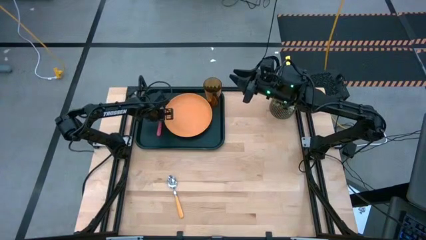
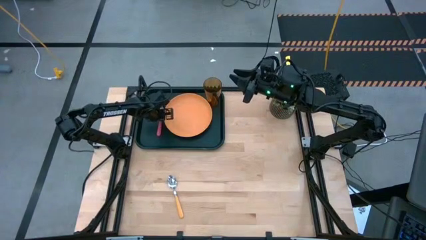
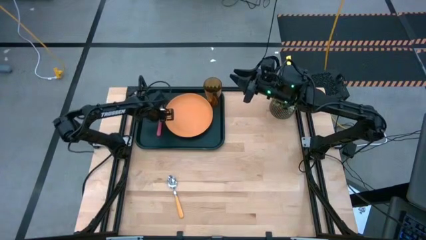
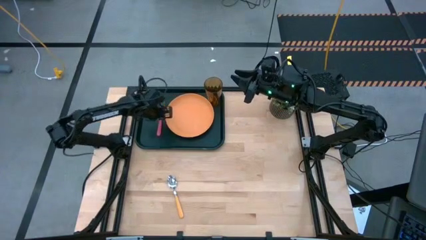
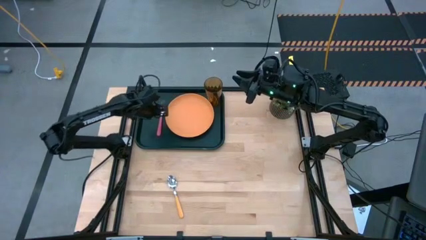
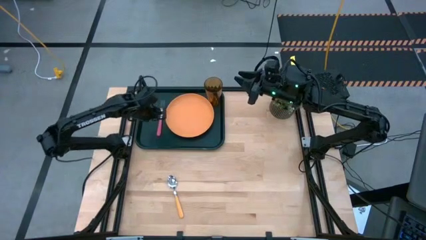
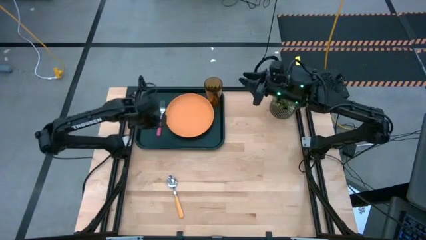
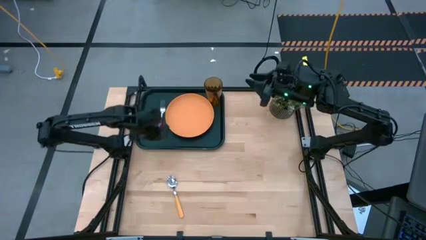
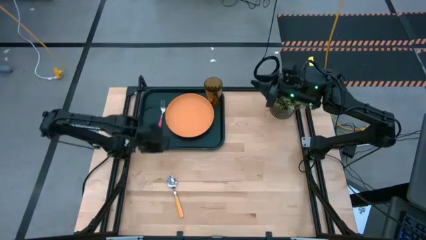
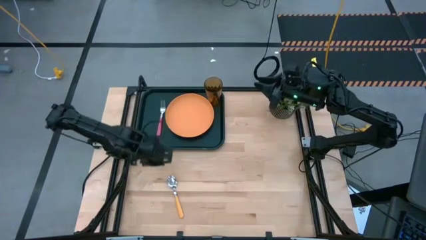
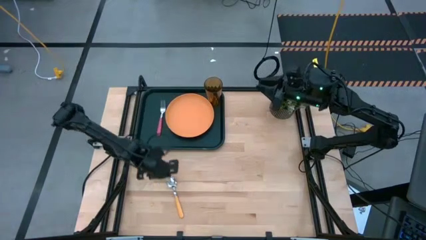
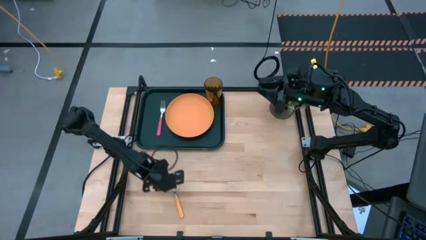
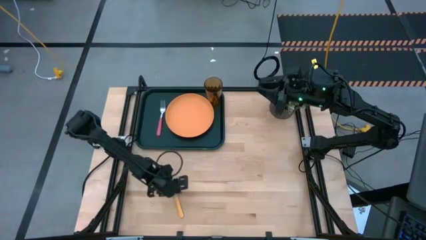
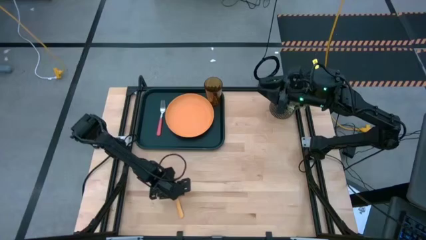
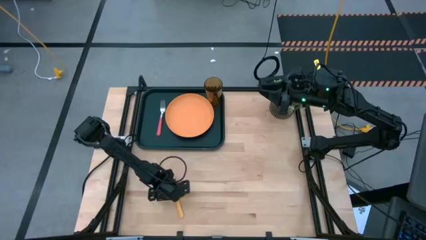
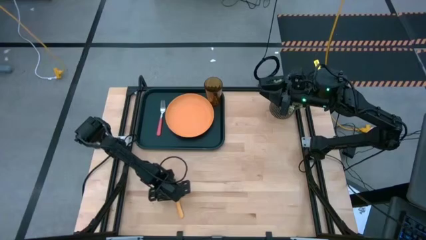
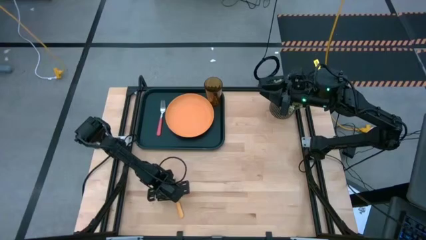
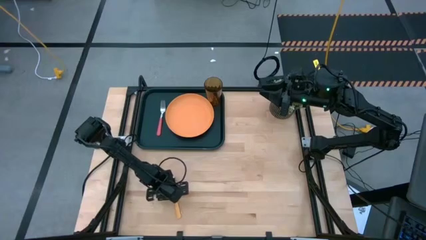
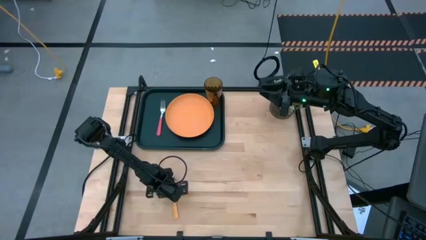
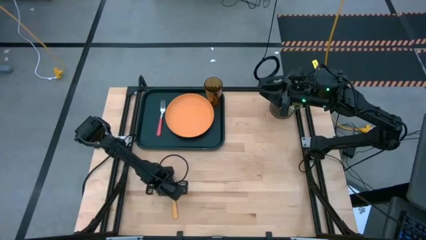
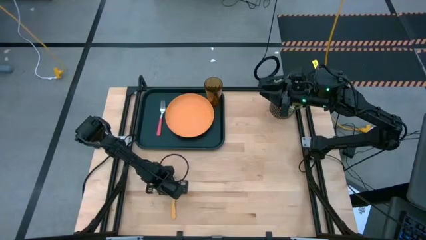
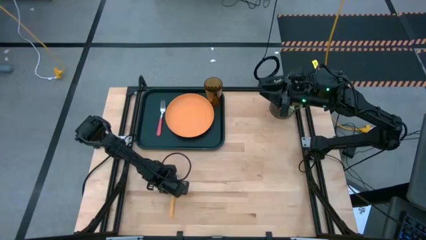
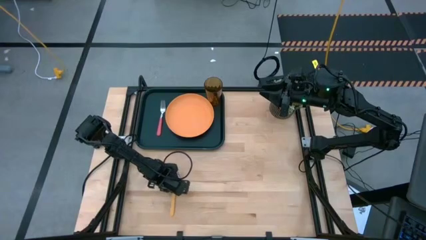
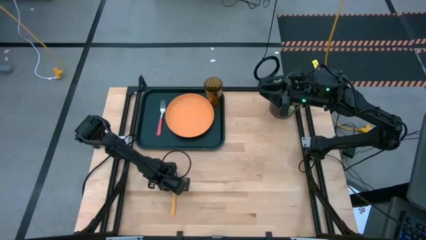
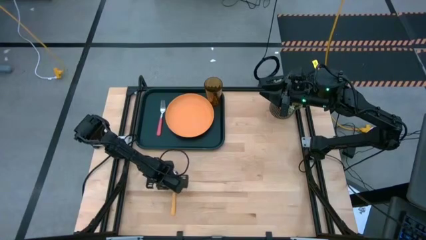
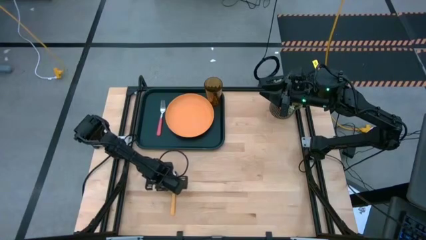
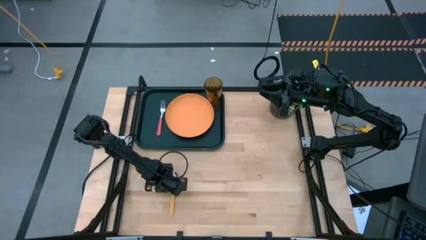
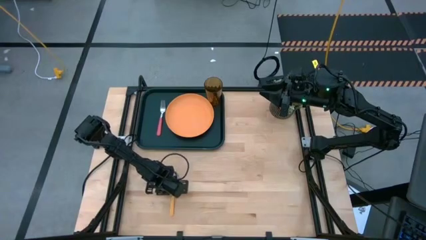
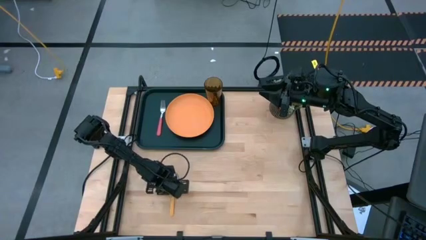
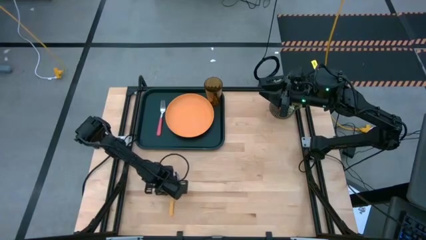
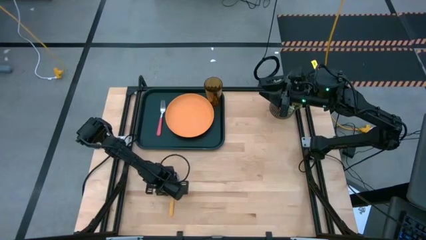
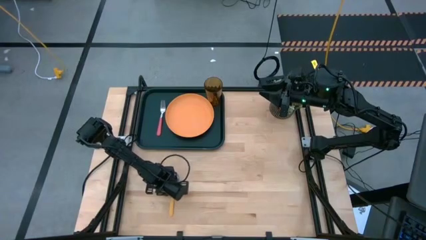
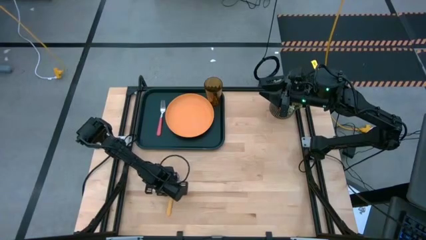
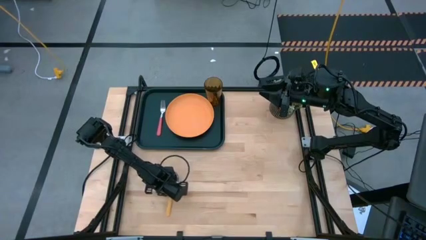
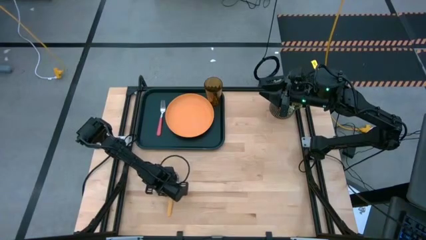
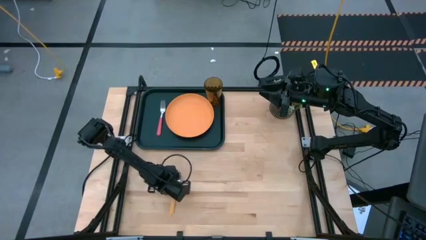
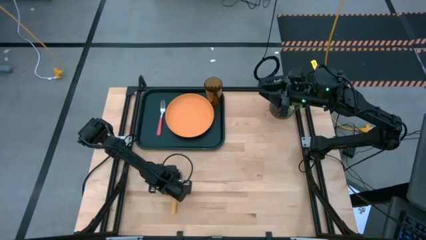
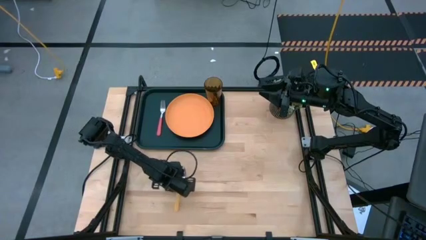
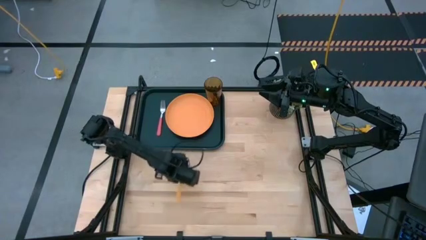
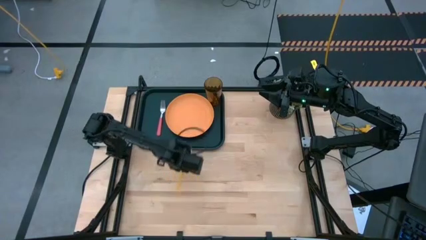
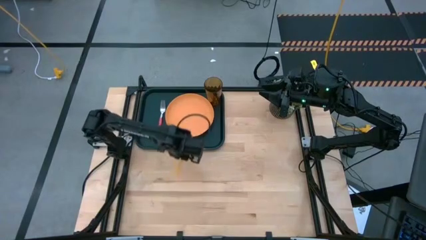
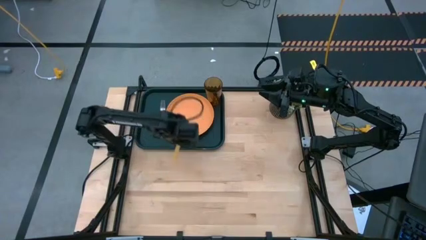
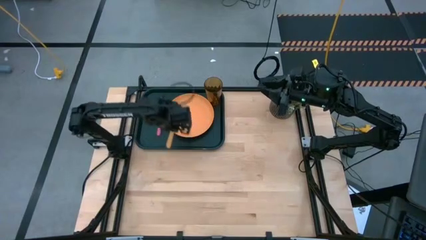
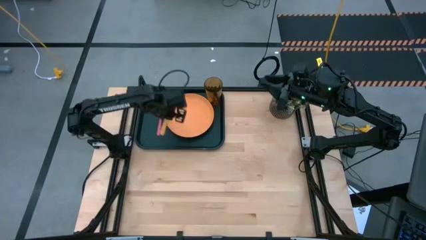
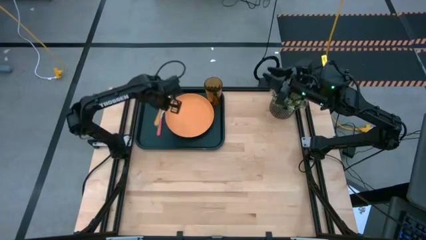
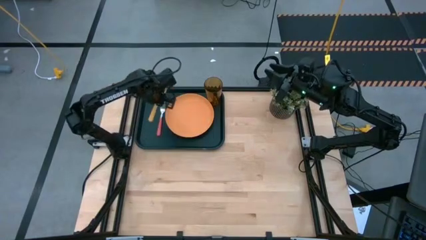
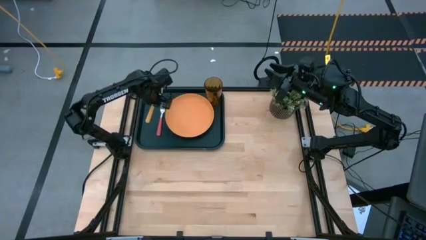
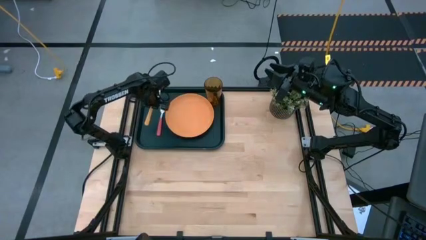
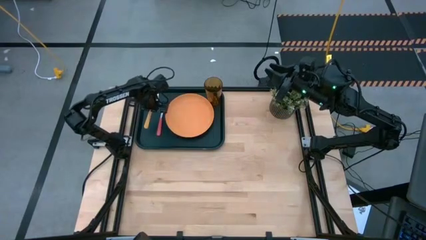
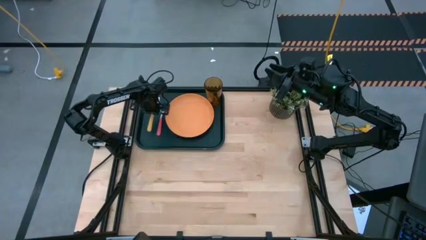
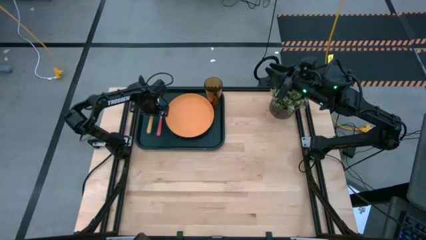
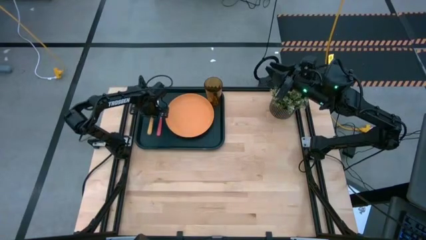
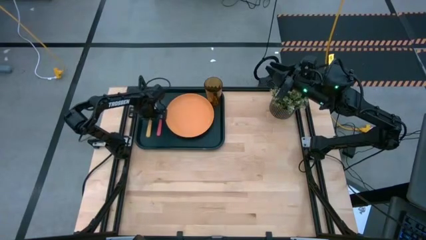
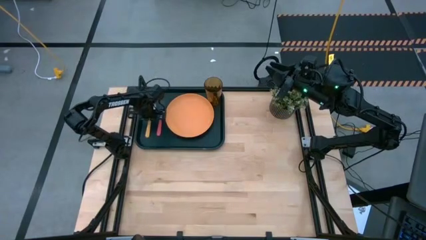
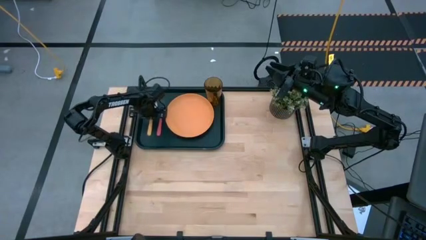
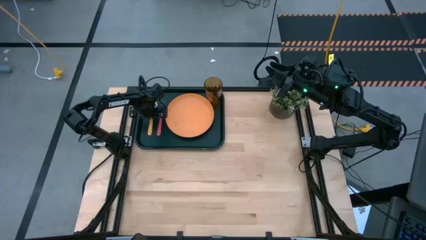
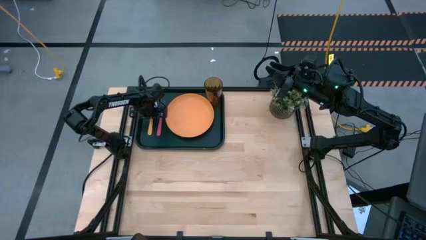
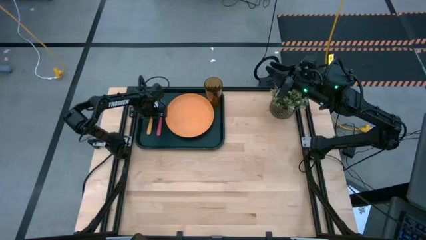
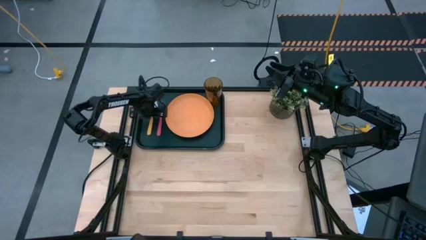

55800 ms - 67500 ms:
Task: Pick and place plate/cup/fork/spoon on tray
Put the yellow spoon on the black serving tray to the left of the pink fork

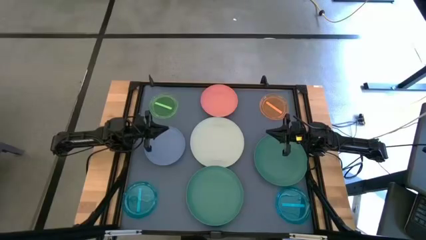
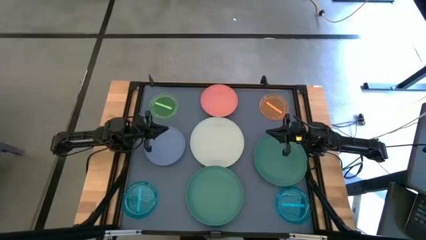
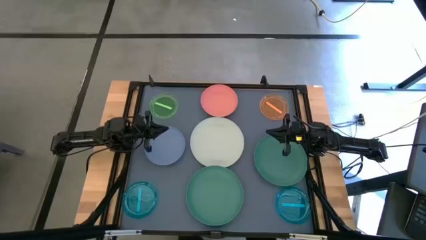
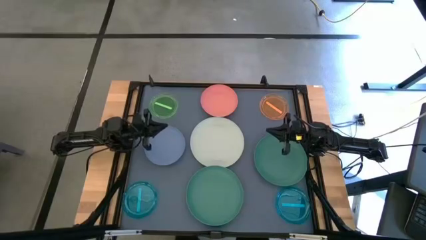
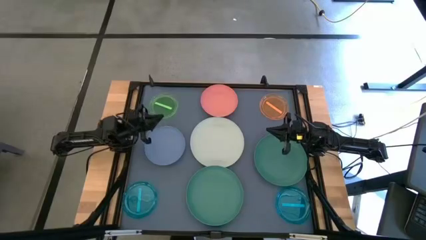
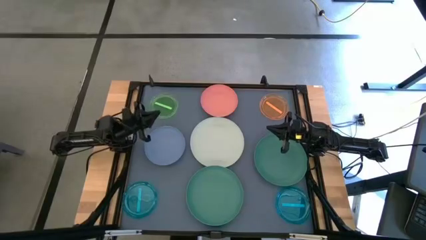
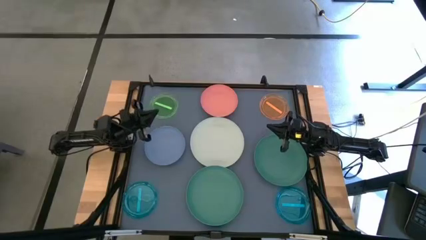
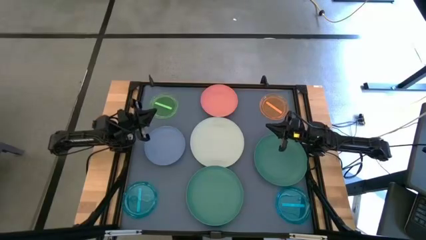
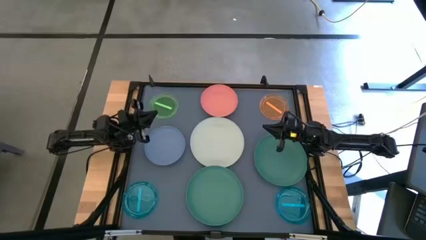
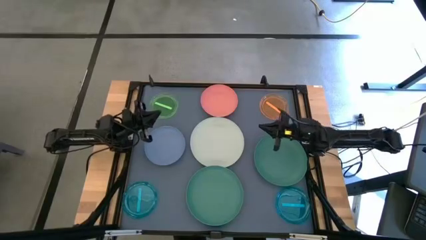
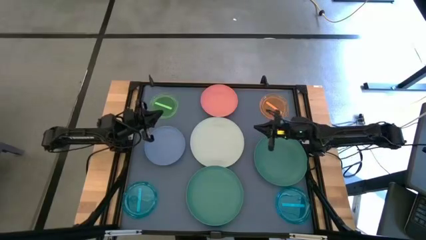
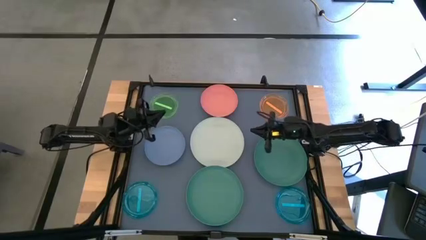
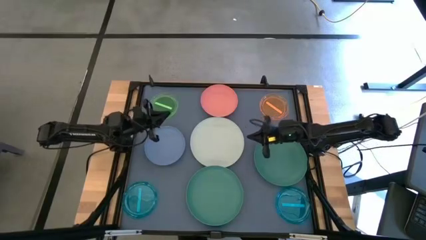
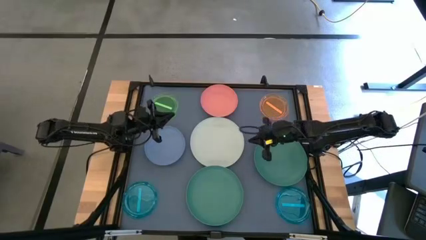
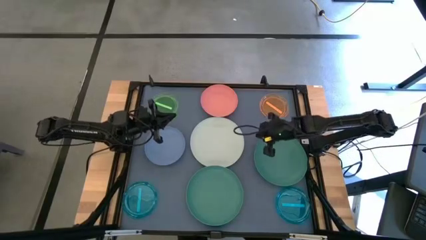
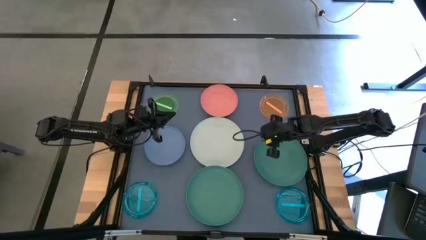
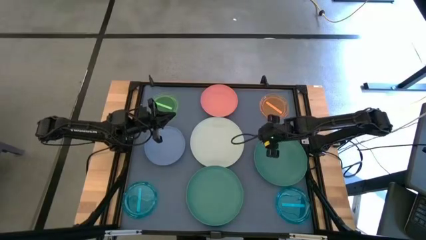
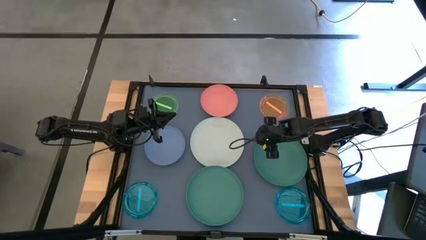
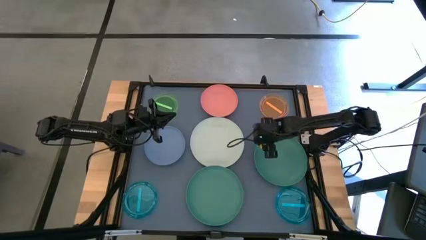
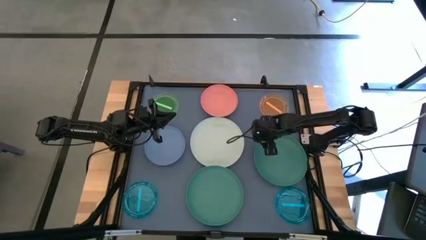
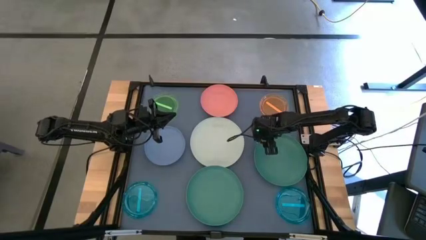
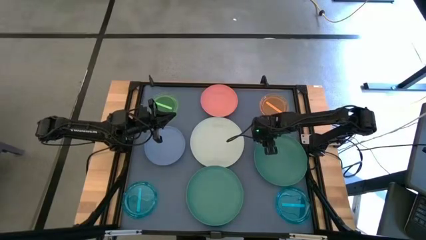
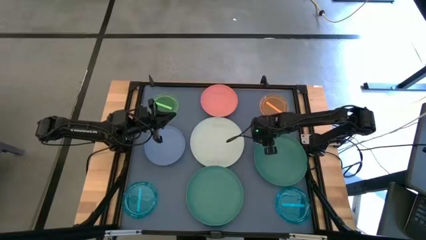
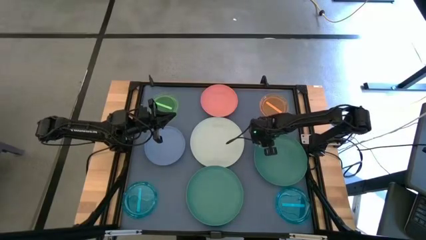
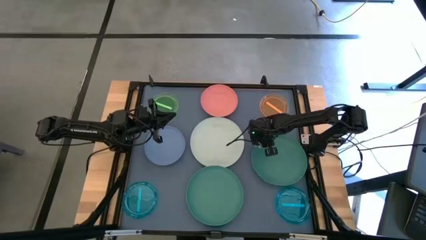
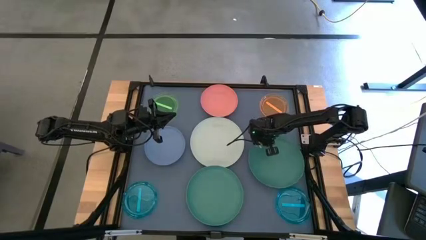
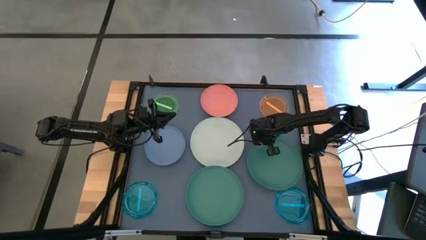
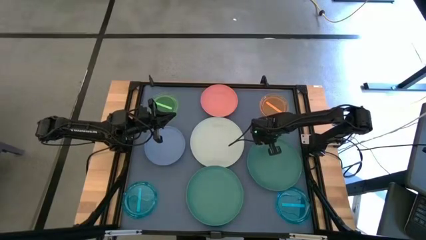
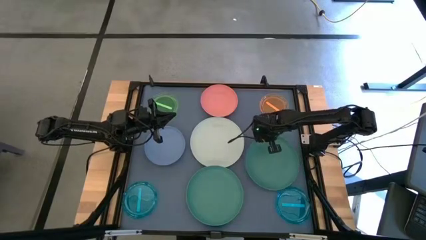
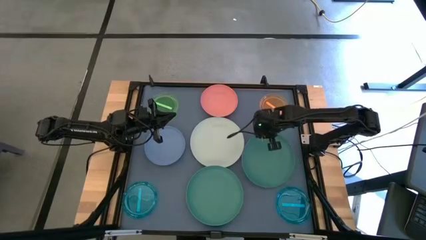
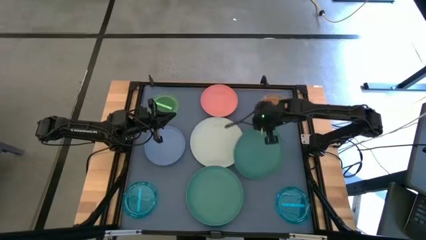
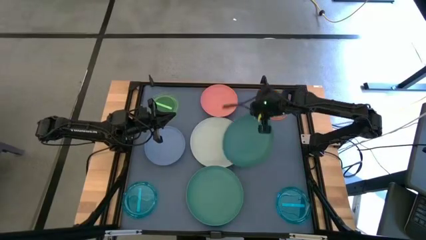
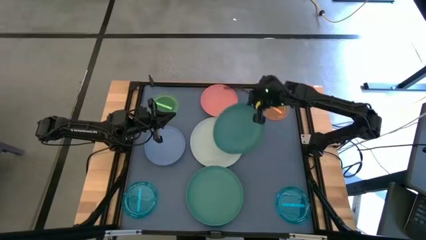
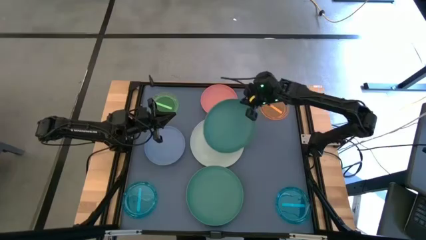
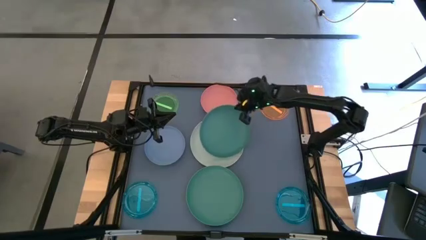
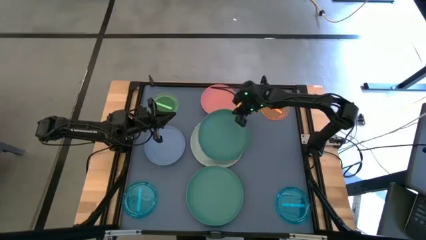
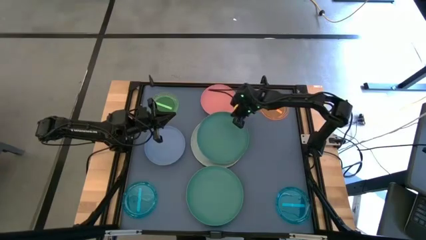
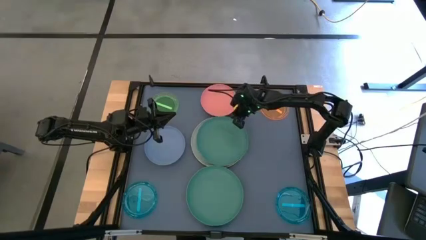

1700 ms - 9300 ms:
Task: Stack plastic plates
Stack the right dark green plate on the gray plate
